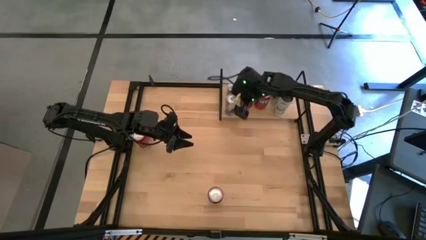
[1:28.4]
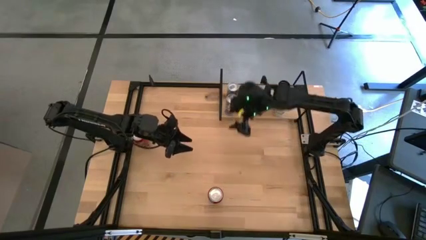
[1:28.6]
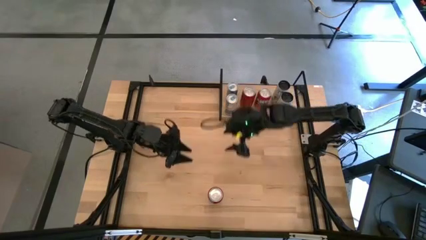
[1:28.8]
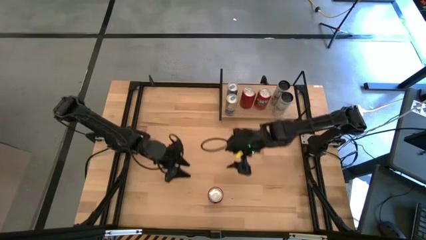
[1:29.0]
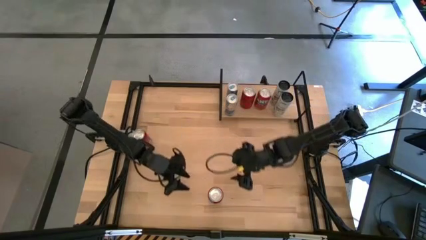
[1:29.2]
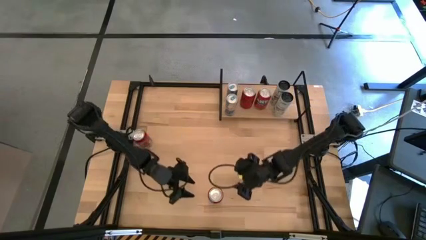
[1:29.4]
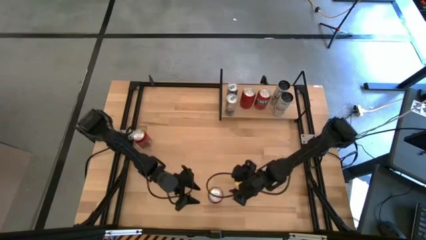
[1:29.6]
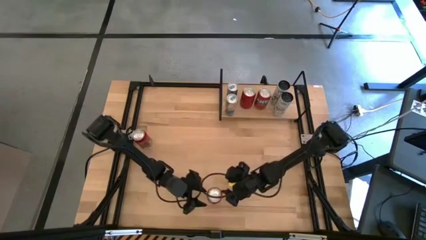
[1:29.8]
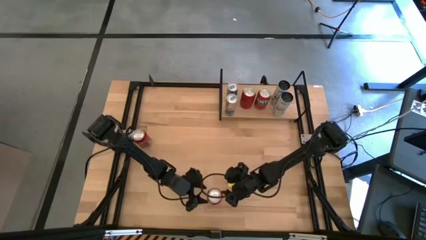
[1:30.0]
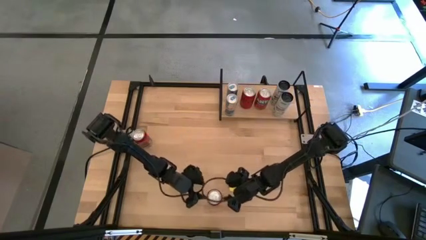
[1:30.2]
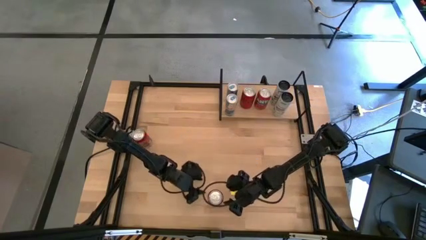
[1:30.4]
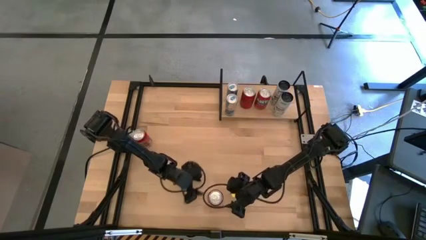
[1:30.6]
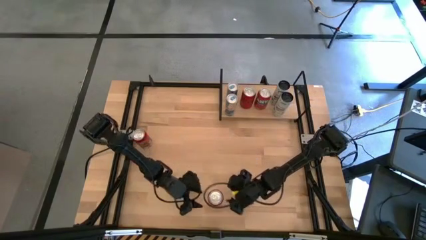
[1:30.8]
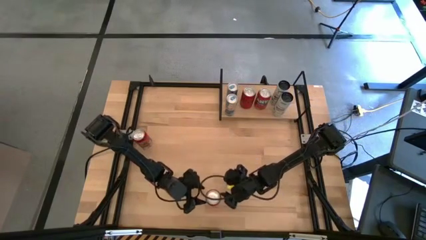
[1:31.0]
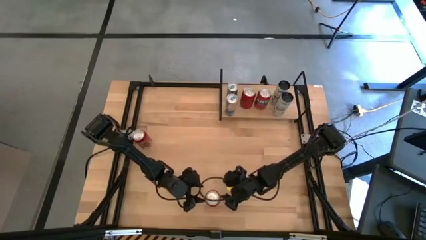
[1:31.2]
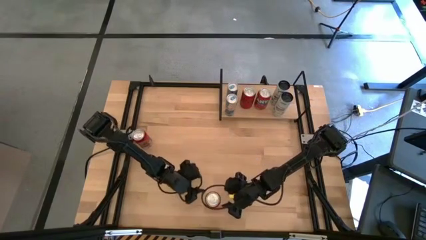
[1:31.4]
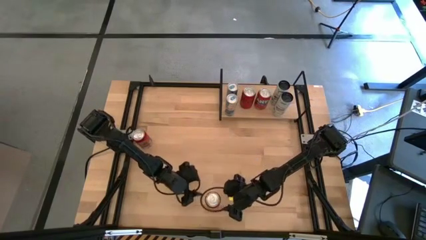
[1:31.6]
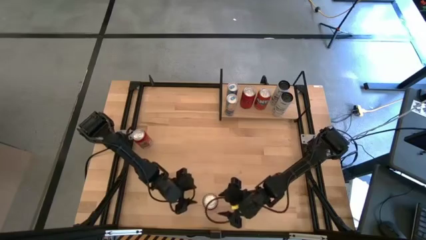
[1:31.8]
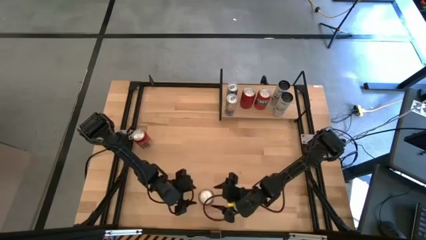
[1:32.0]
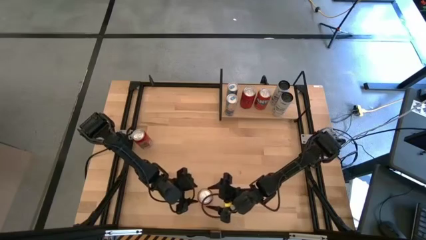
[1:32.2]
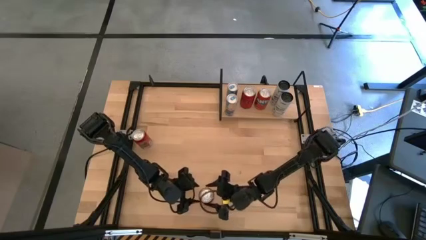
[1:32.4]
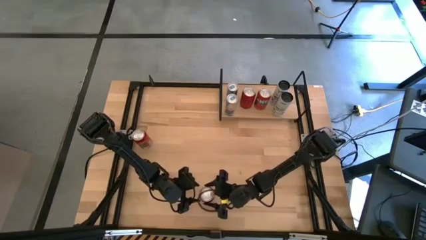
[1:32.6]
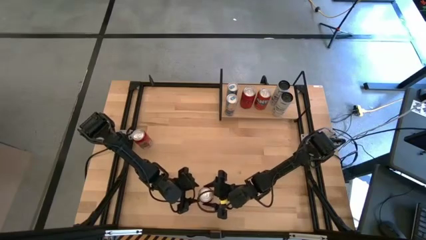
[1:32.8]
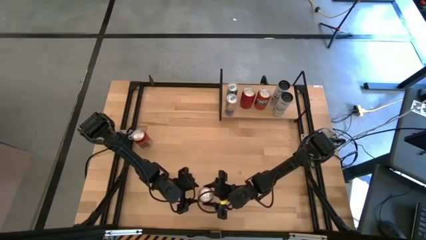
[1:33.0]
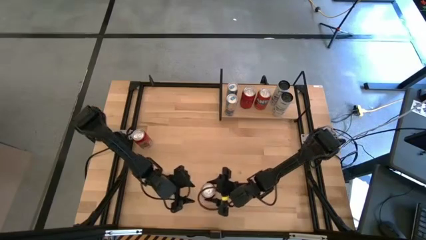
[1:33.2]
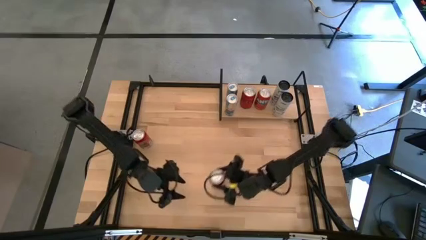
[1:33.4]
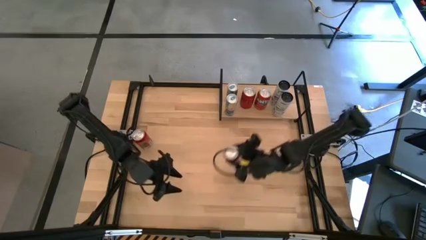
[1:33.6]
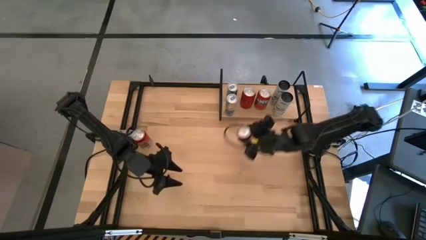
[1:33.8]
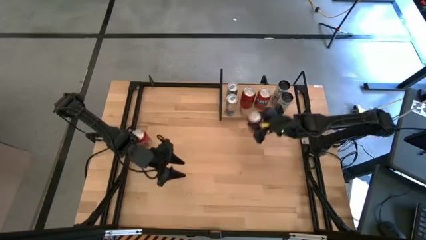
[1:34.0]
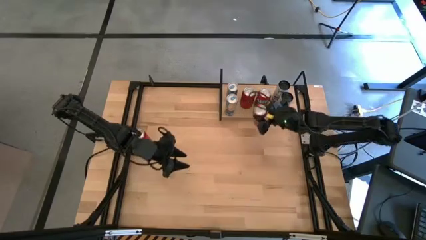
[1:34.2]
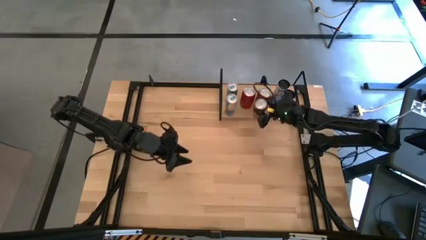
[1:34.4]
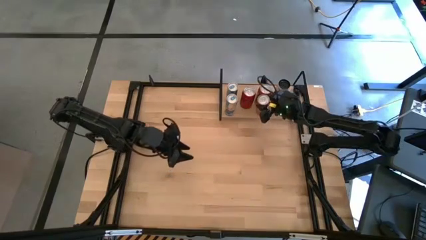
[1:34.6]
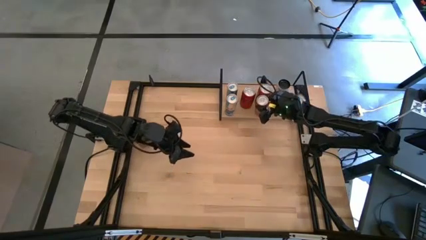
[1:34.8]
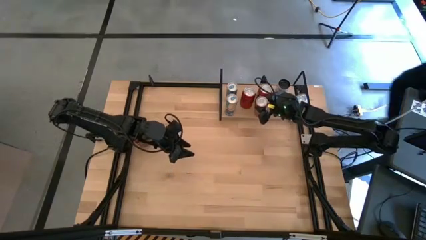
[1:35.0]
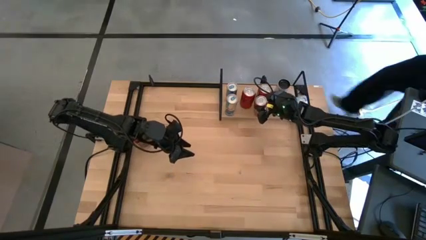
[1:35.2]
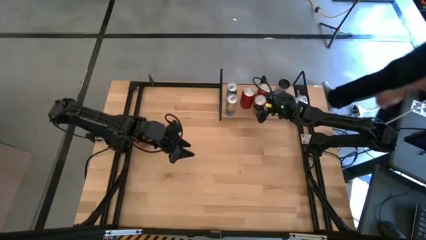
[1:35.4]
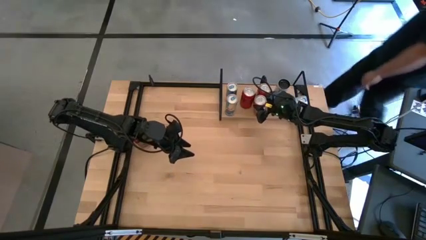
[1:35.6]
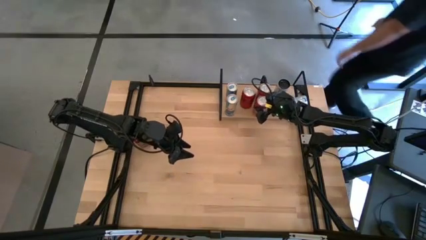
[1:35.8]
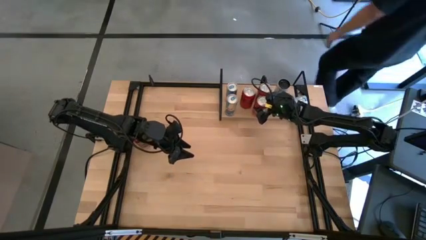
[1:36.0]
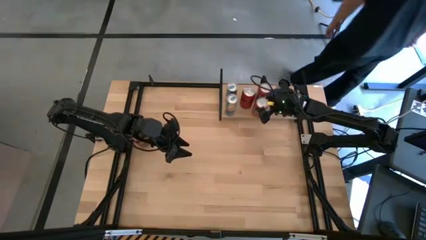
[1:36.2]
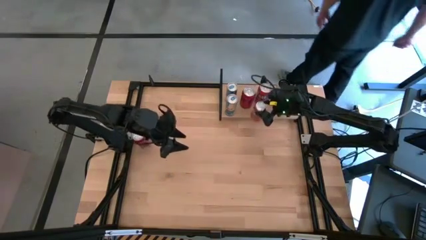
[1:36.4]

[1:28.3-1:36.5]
Task: Place canned beverage on shelf
Put the red soda can on the shelf aligned with the other red soda can

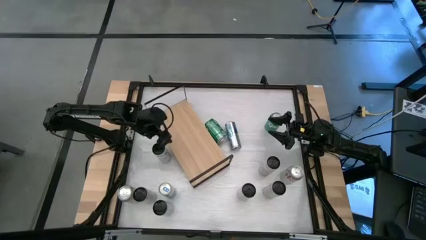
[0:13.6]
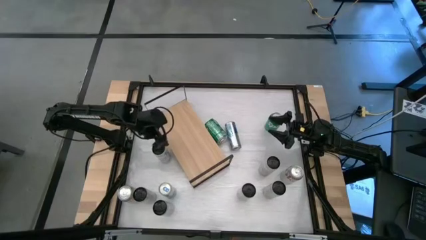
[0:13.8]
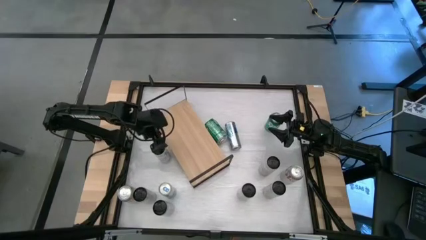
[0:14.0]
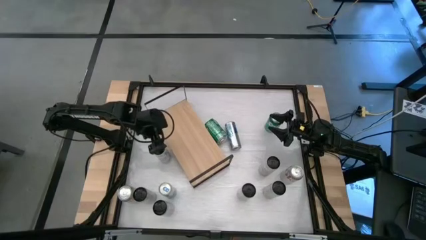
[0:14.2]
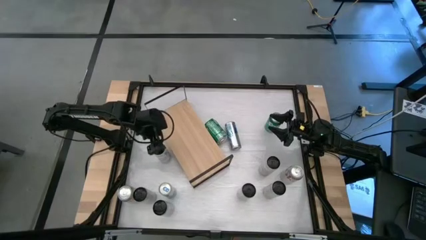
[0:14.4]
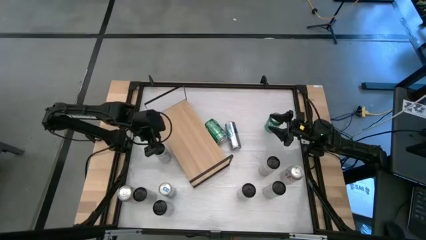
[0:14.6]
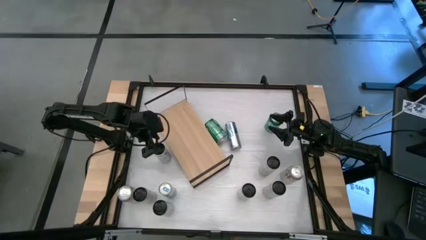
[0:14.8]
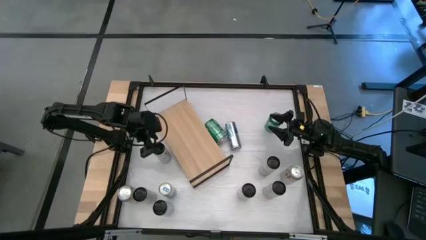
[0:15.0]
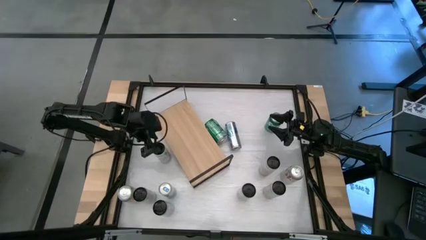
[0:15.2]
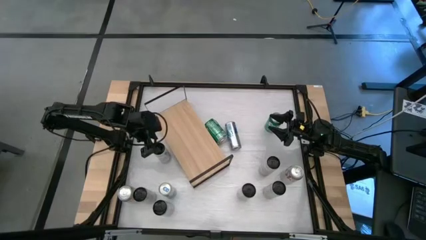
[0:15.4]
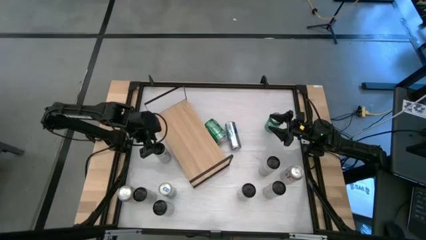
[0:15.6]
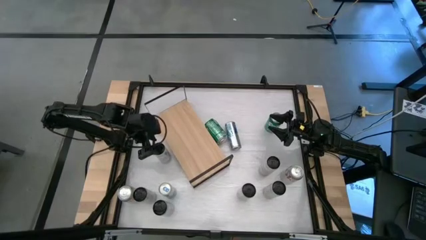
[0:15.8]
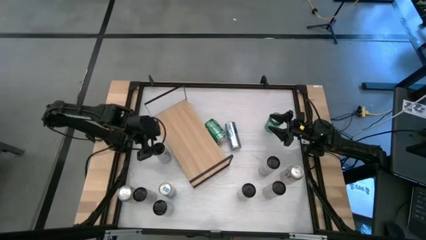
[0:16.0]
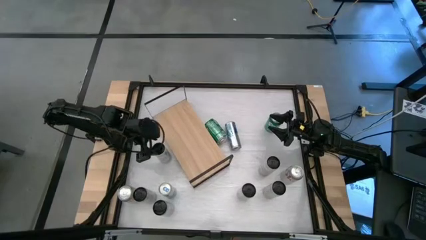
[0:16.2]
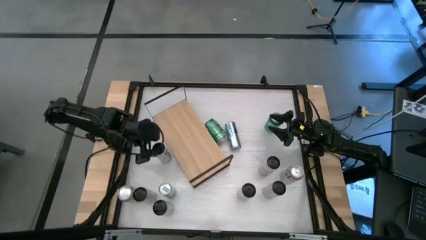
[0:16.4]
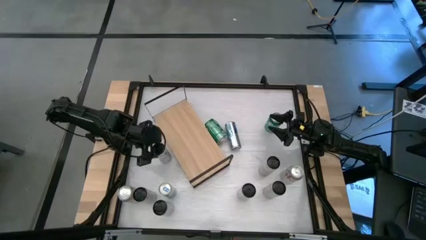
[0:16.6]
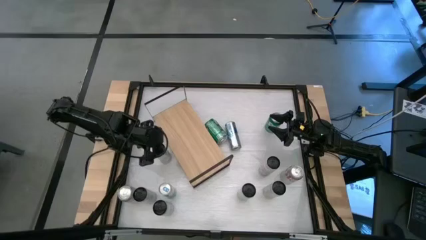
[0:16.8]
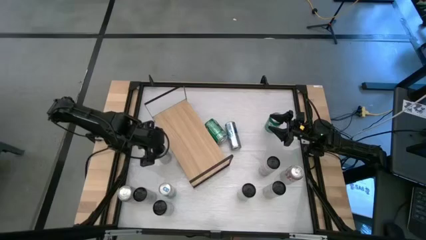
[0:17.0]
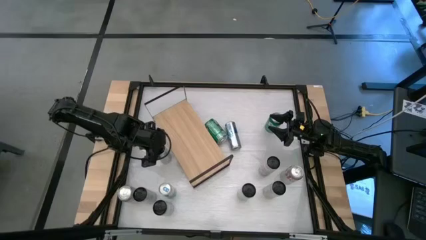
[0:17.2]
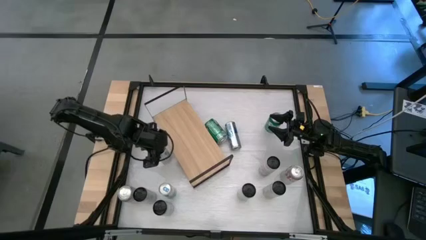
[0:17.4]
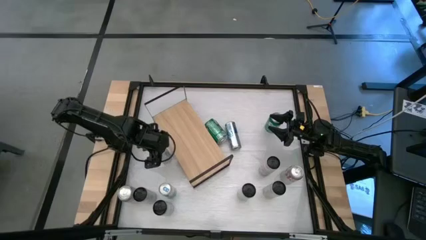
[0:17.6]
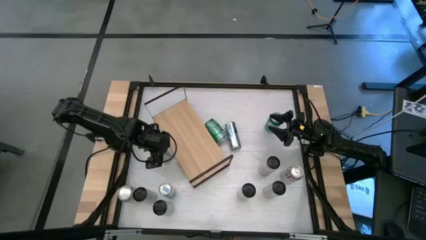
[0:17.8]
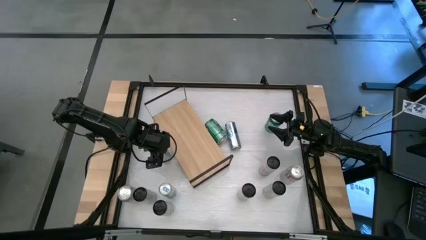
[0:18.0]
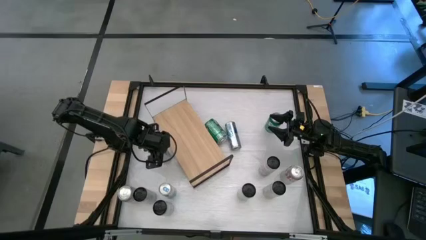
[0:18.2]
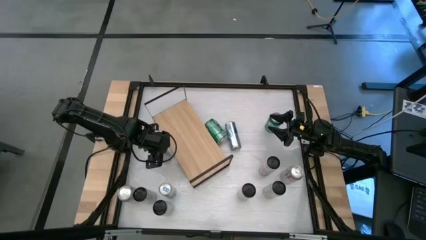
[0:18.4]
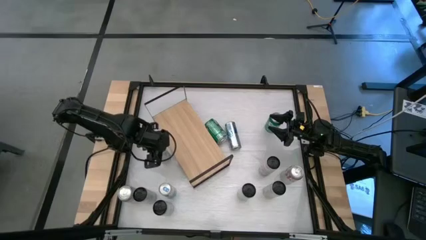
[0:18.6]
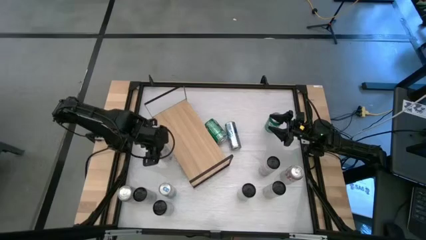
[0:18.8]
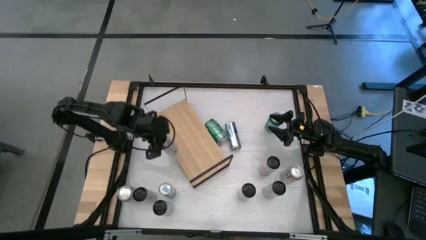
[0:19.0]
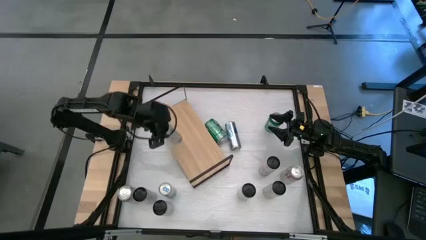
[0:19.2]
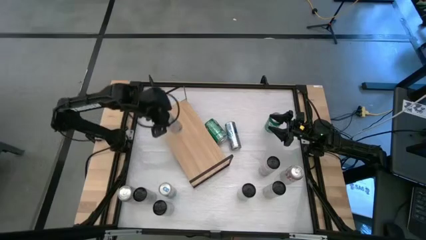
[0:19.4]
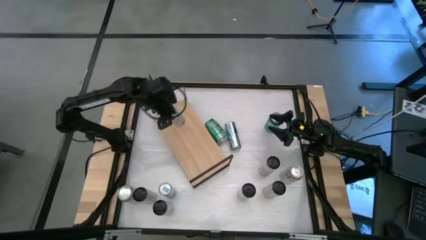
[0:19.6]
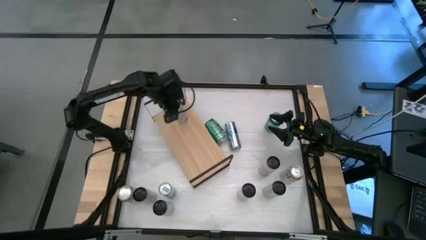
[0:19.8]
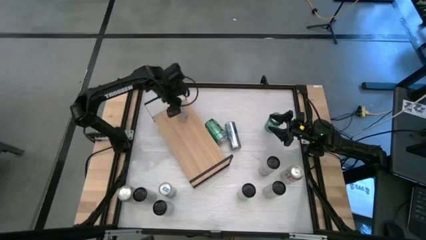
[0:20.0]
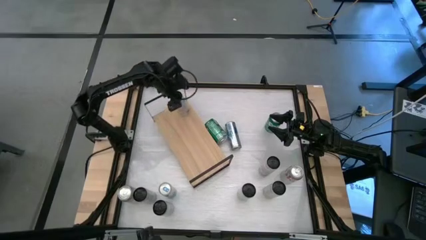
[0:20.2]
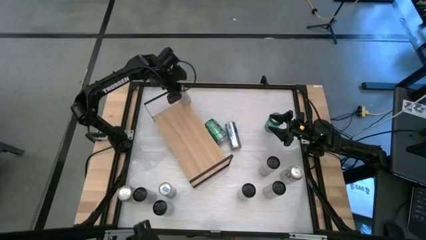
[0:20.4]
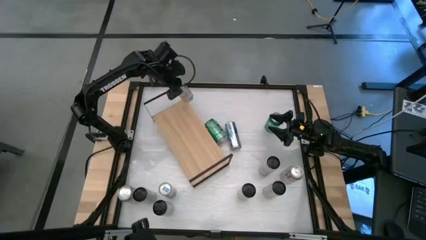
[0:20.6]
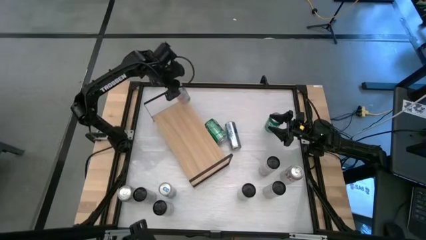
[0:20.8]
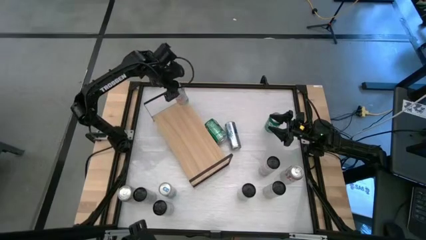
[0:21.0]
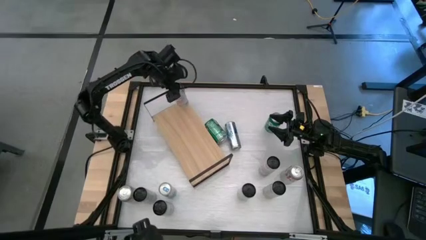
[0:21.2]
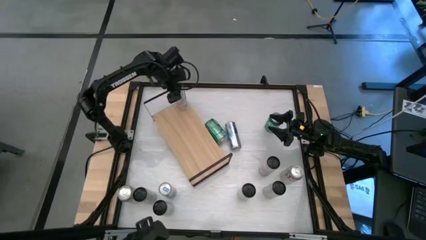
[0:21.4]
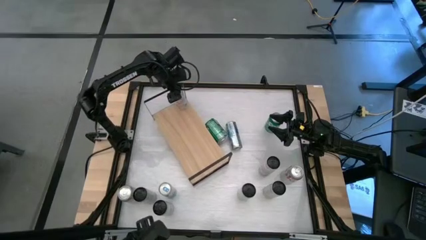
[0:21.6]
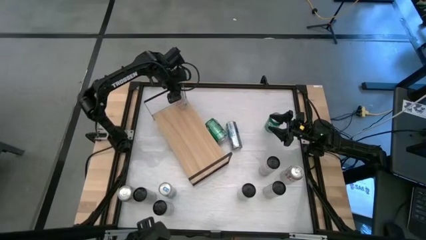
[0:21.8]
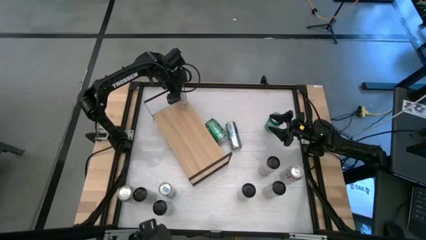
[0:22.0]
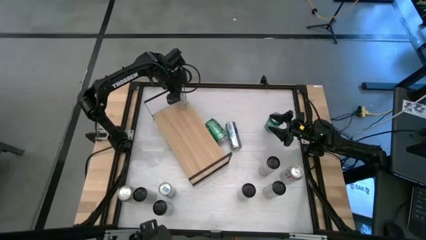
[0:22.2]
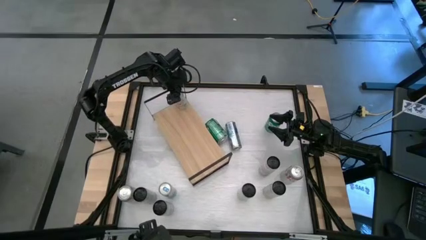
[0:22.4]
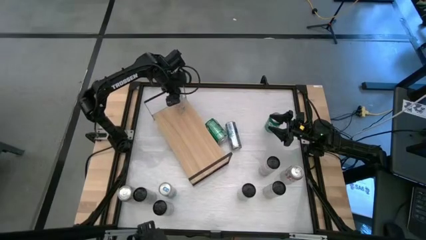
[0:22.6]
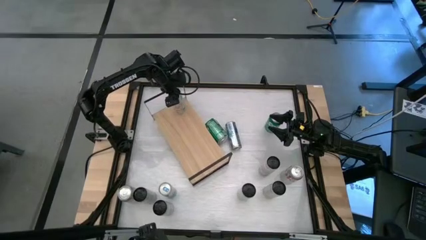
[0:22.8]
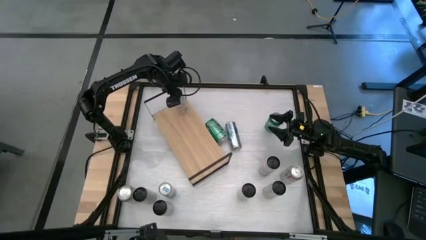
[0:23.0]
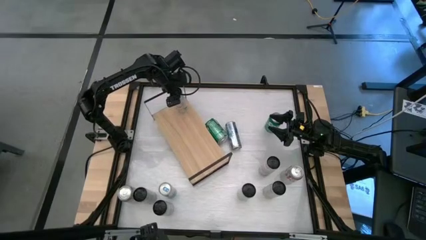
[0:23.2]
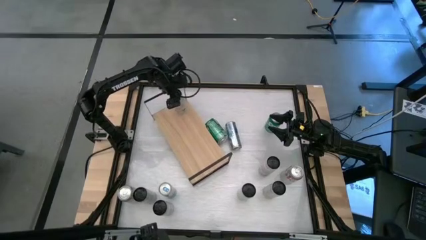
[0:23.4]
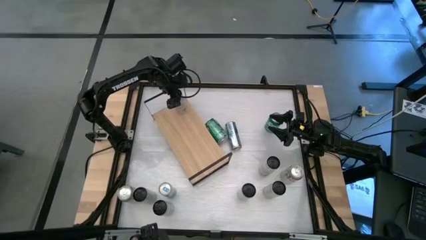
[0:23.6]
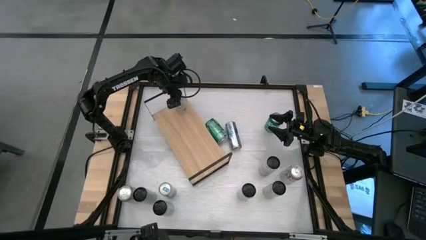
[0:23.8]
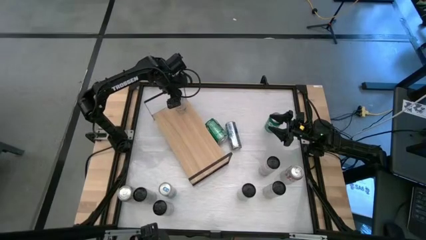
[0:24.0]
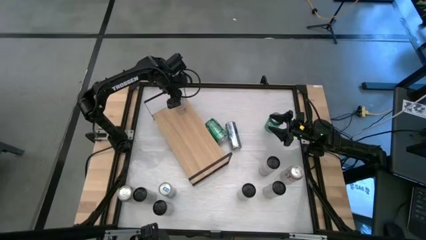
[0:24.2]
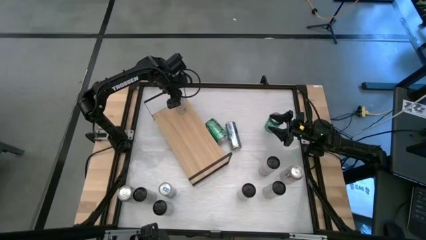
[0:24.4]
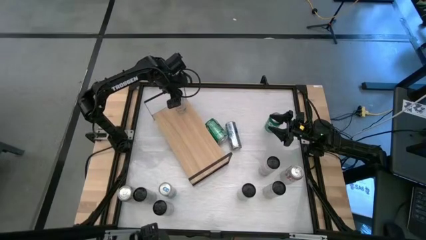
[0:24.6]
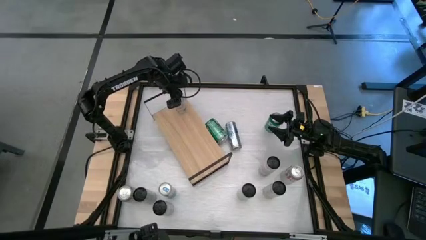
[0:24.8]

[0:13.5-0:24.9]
Task: Place canned beverage on shelf
Put the white pink soda can on the shelf
